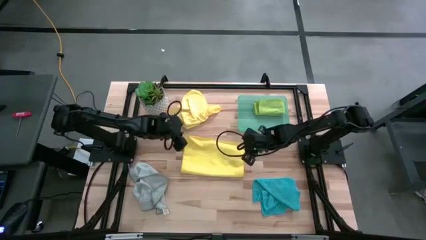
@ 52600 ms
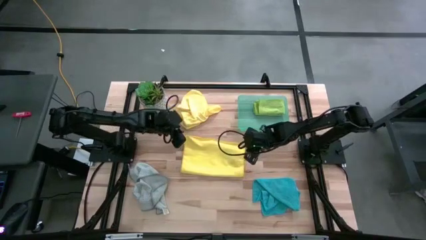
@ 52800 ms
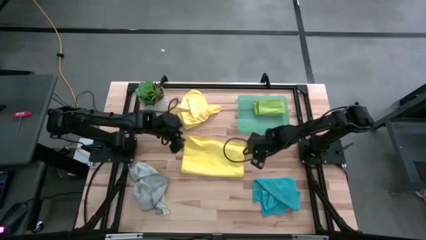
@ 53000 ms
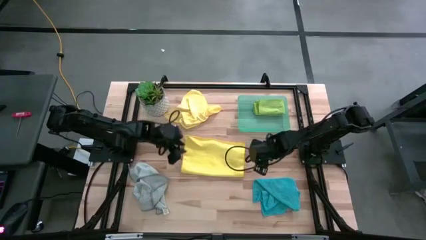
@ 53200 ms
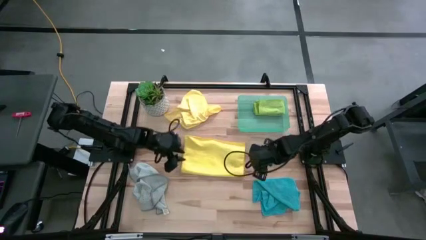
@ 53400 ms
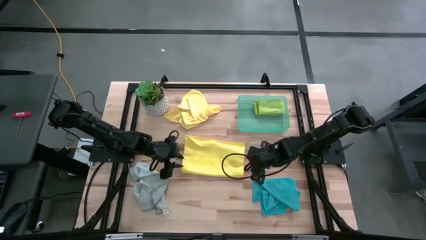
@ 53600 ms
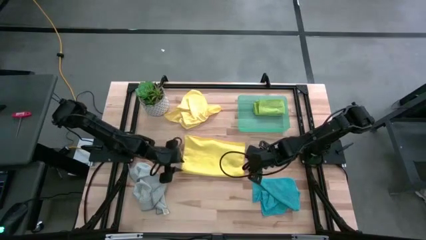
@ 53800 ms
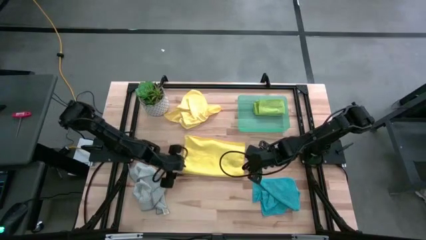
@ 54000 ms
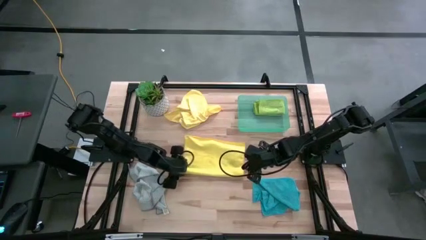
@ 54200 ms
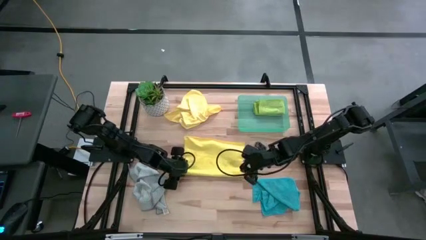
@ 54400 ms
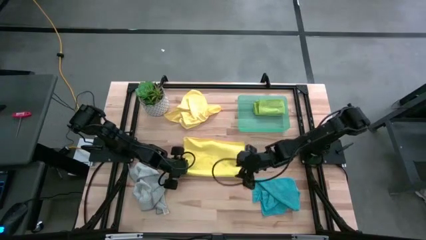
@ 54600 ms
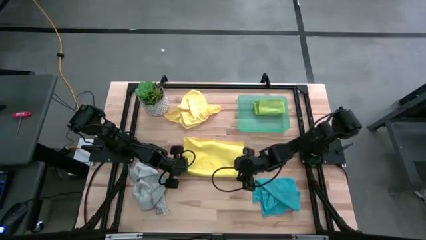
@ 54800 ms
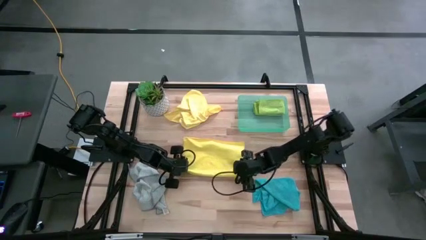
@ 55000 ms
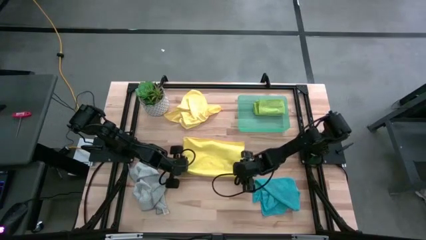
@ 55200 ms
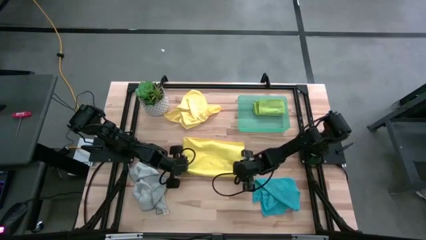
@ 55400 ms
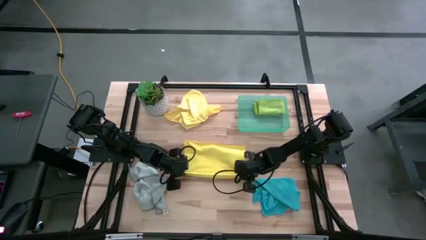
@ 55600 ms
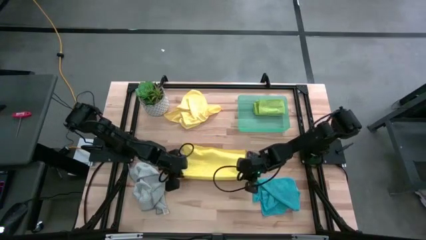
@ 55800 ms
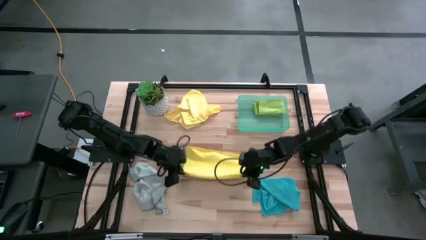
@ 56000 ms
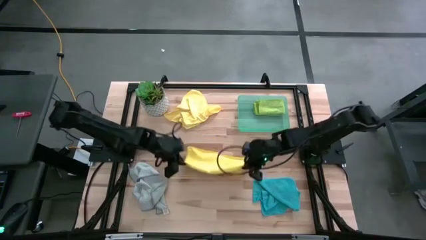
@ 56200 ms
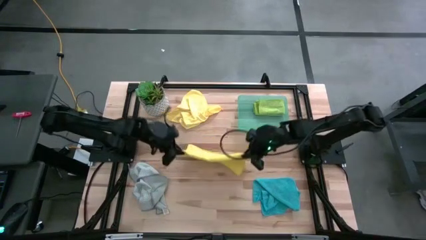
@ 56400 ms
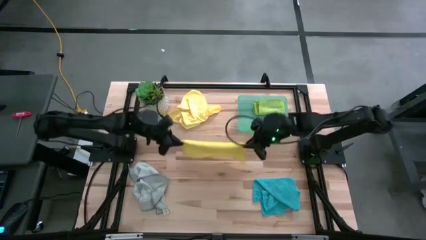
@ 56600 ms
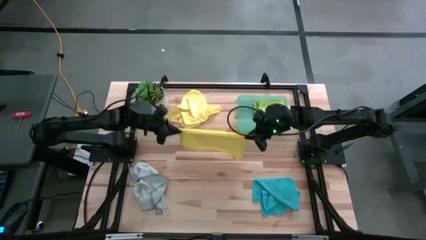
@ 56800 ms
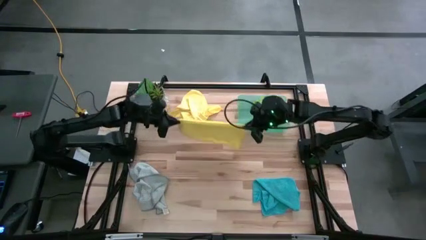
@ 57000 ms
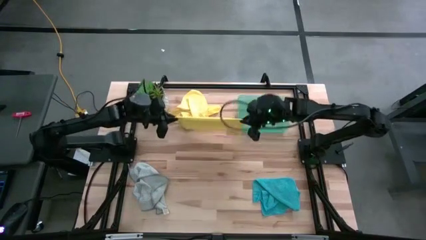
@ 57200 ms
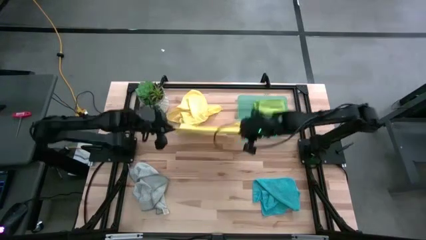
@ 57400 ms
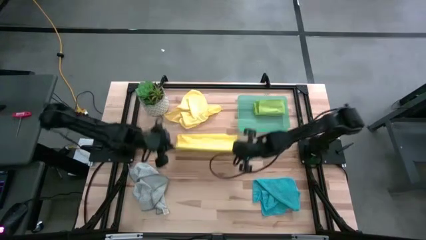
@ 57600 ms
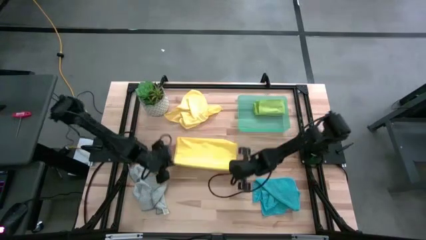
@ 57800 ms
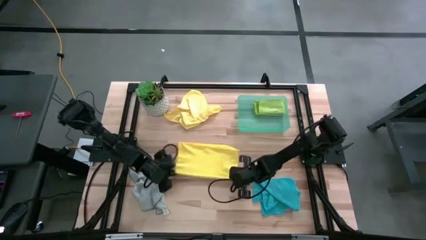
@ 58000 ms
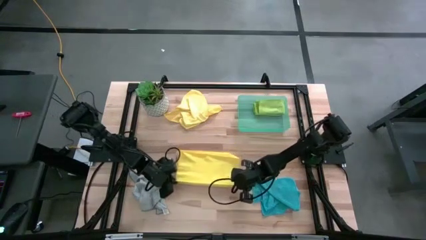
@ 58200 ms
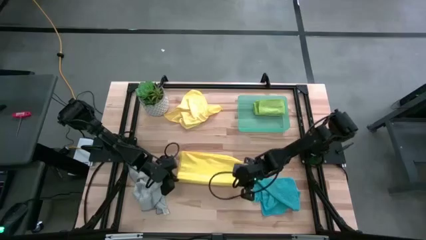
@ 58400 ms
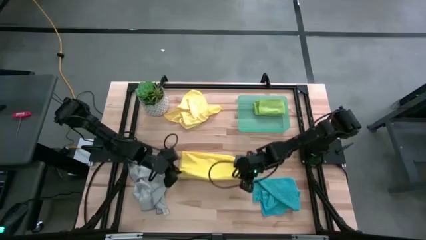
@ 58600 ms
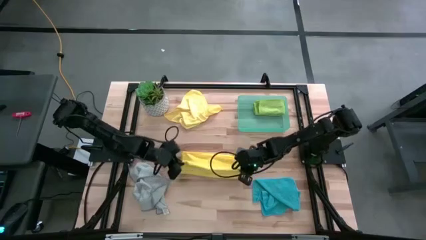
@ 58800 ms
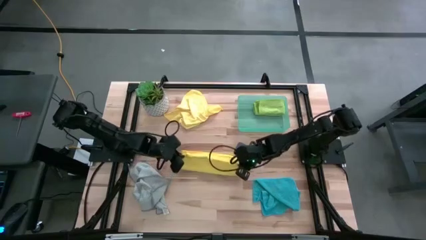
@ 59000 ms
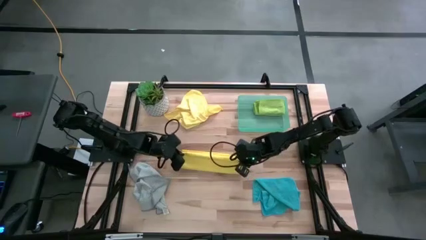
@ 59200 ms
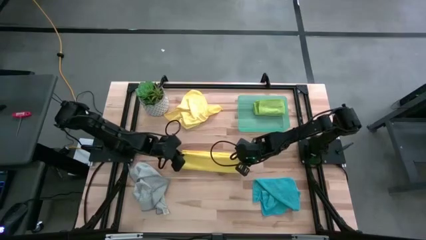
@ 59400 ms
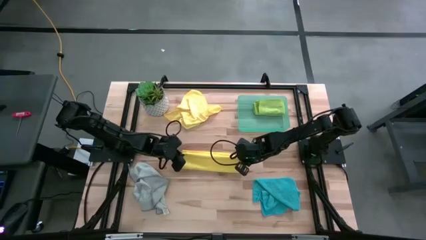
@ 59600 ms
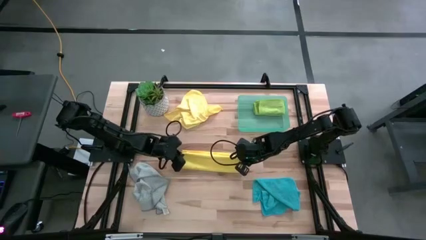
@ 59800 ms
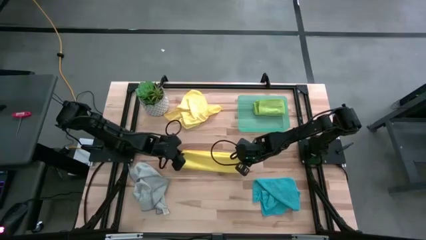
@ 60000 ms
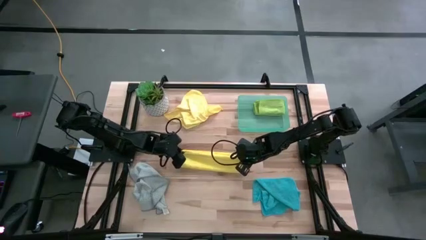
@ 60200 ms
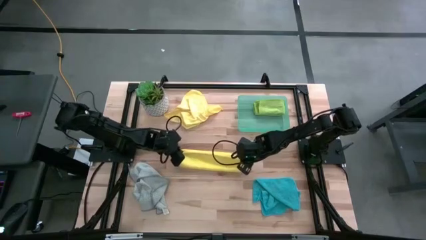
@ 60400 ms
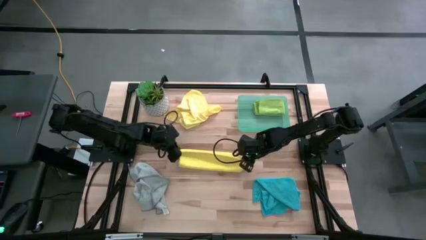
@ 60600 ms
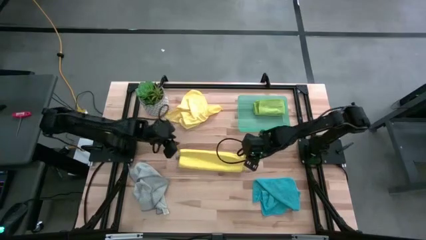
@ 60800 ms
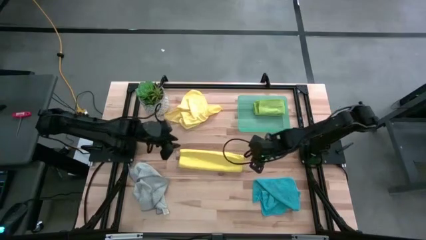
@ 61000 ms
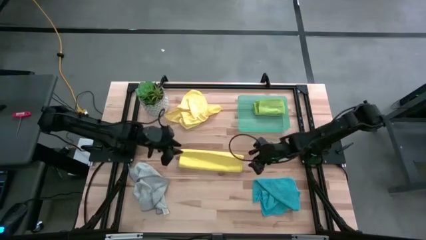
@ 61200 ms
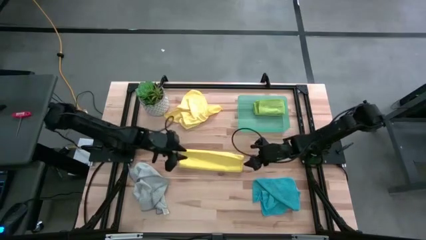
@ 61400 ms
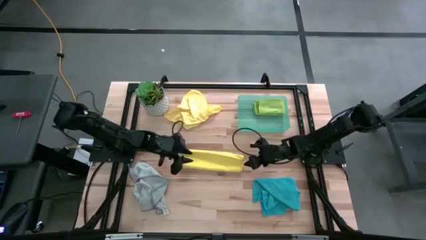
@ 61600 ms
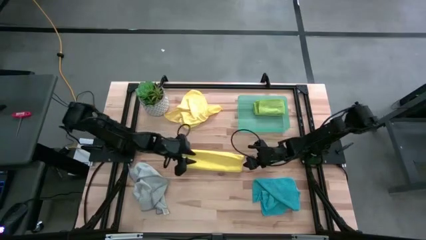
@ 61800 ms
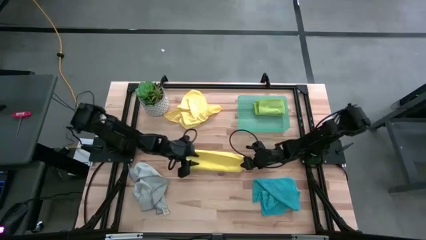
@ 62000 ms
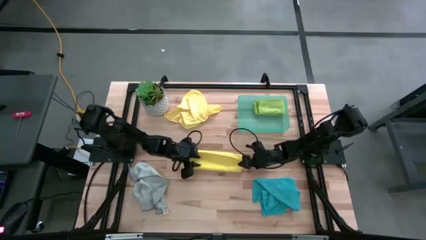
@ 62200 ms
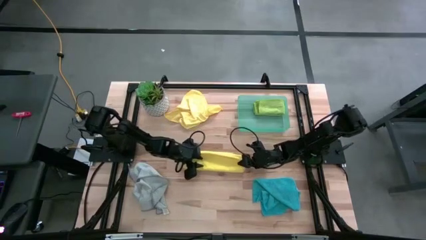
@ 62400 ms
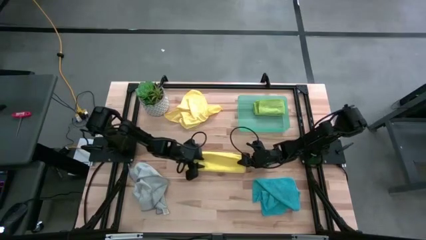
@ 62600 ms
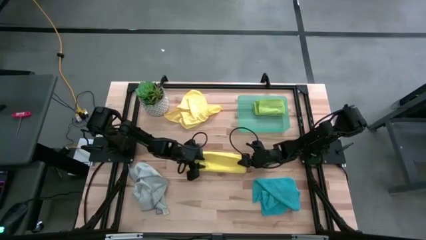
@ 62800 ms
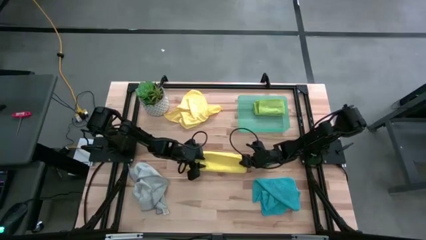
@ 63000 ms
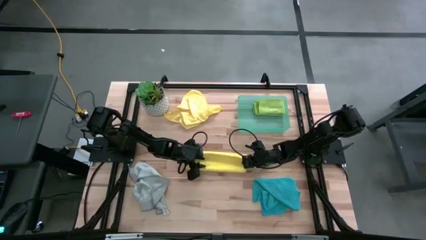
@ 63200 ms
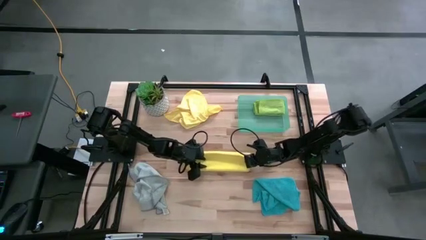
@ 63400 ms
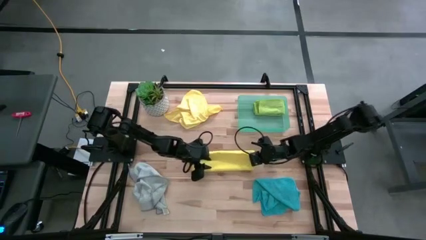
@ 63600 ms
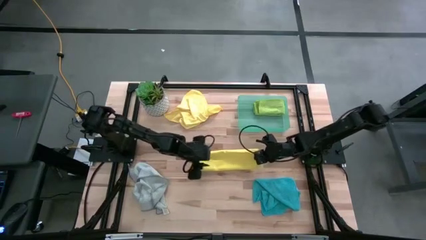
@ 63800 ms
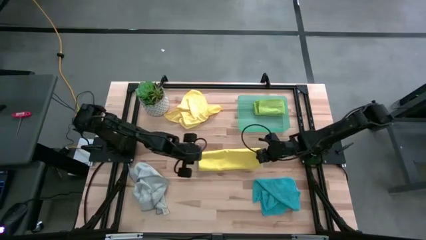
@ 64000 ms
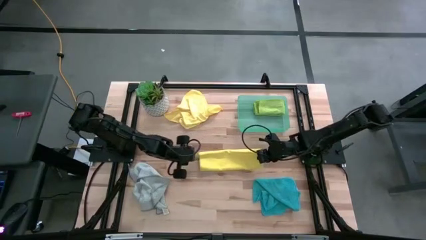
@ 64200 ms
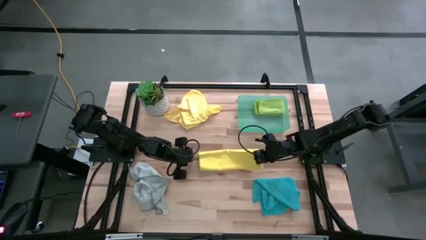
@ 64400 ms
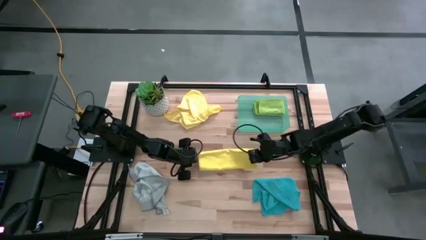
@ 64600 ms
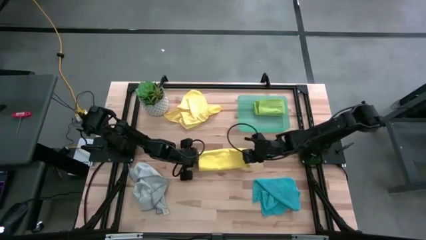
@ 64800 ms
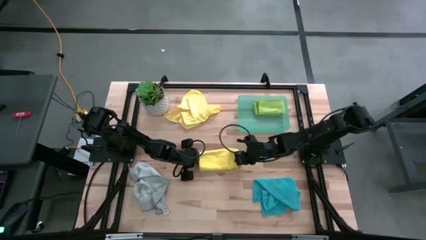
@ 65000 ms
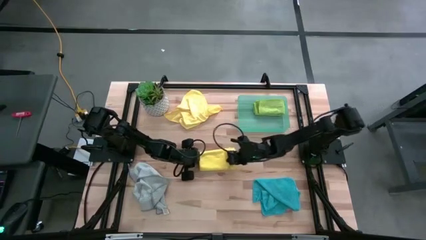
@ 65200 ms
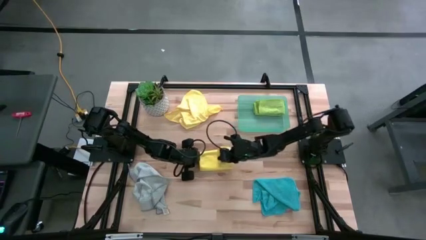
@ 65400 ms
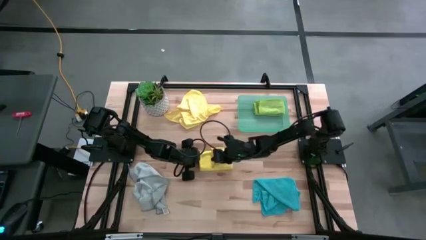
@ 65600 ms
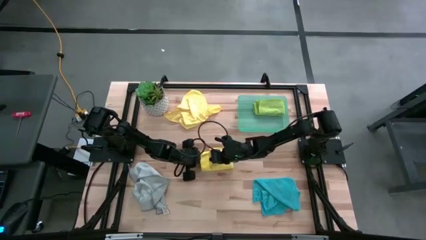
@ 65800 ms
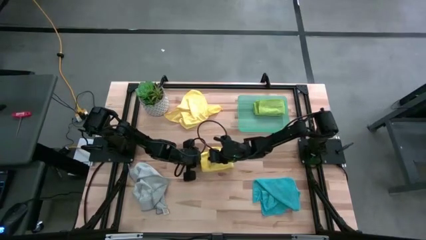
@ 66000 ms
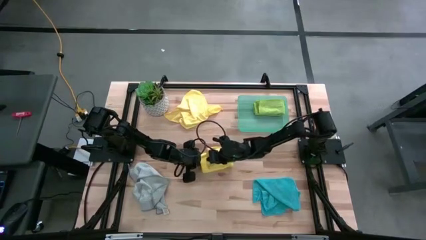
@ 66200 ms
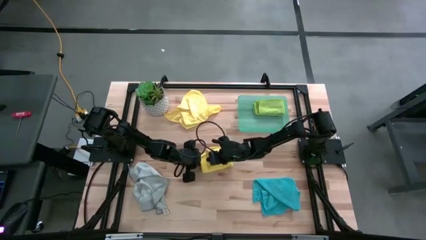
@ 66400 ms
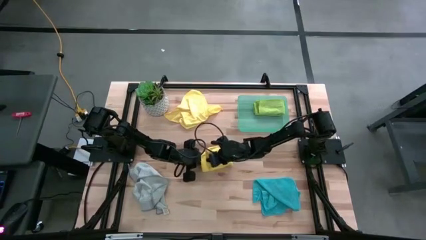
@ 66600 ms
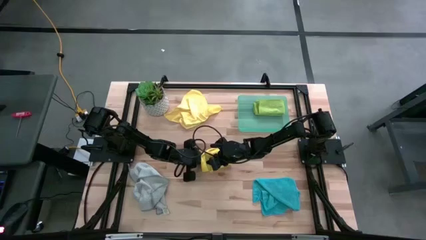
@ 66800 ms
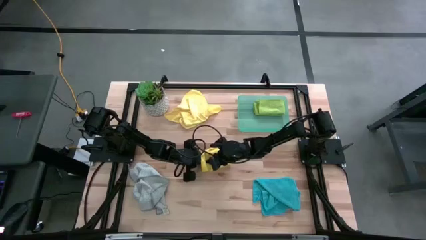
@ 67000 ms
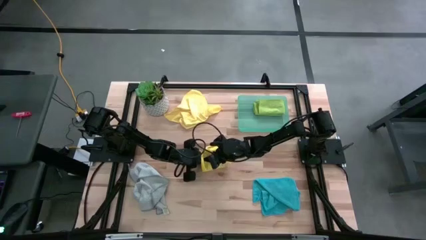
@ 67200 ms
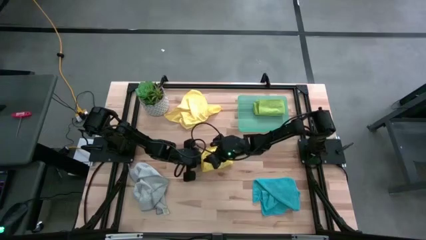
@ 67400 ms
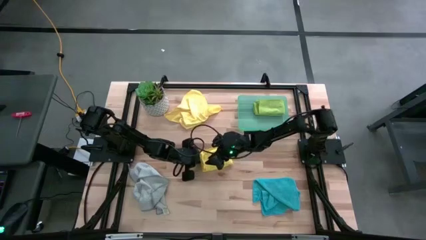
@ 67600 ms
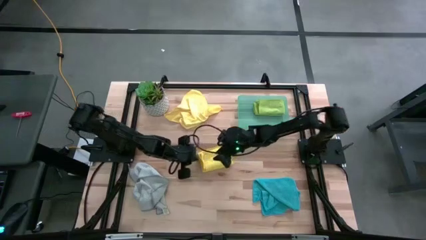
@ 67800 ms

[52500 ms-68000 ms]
Task: Fold microfiber towels
Fold the bottom yellow towel
